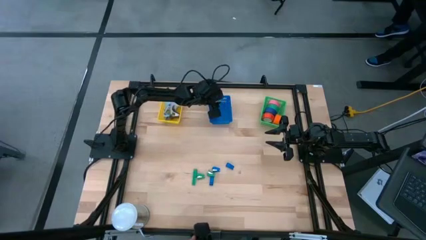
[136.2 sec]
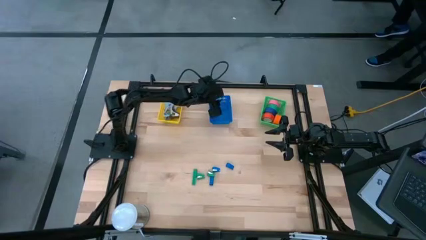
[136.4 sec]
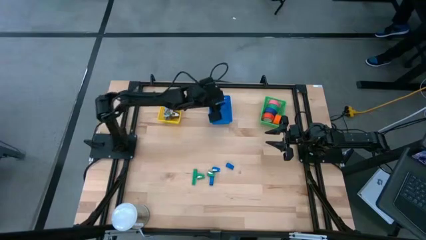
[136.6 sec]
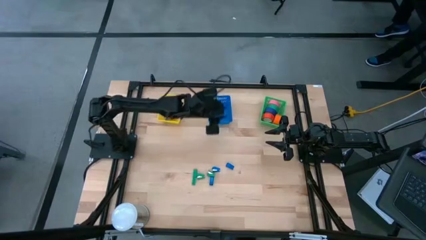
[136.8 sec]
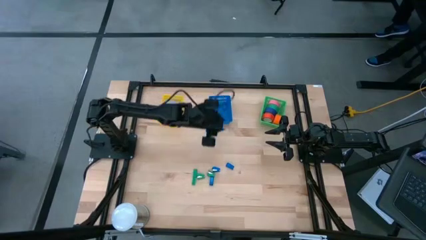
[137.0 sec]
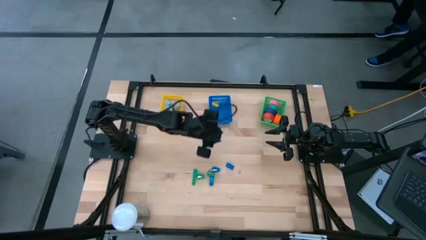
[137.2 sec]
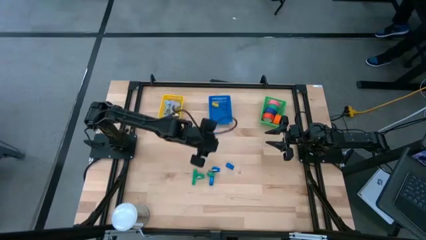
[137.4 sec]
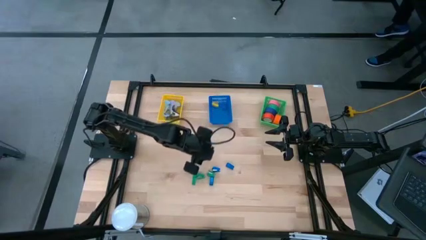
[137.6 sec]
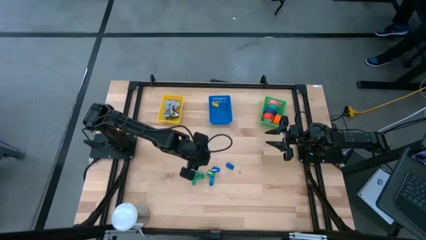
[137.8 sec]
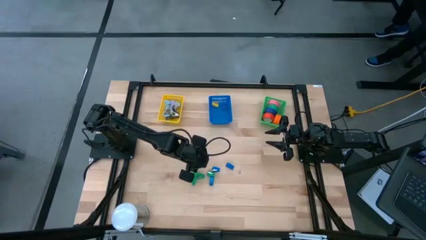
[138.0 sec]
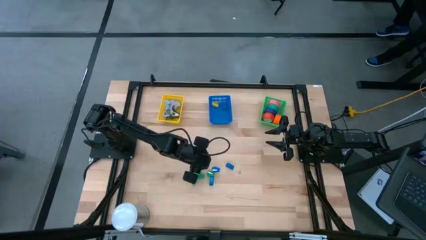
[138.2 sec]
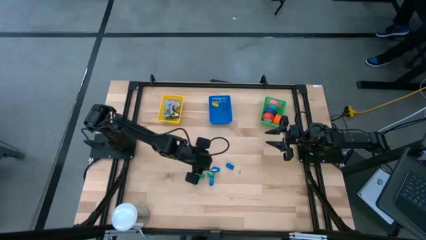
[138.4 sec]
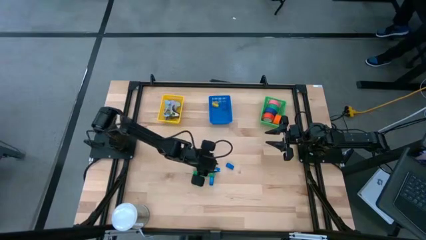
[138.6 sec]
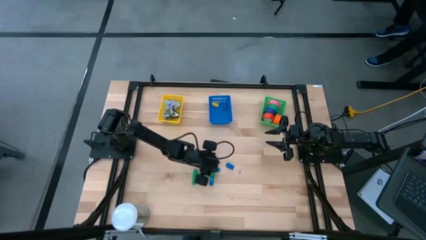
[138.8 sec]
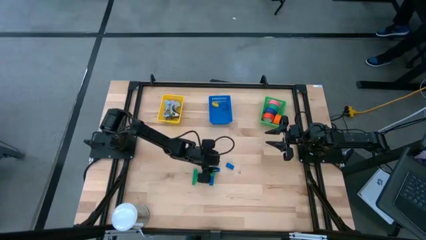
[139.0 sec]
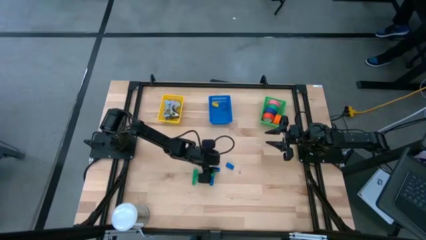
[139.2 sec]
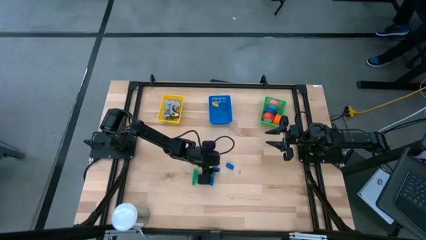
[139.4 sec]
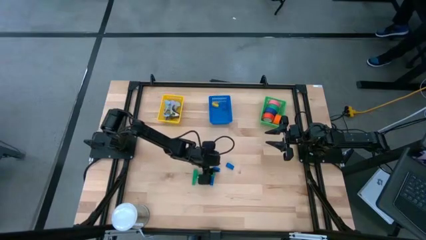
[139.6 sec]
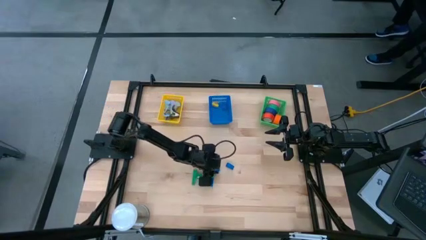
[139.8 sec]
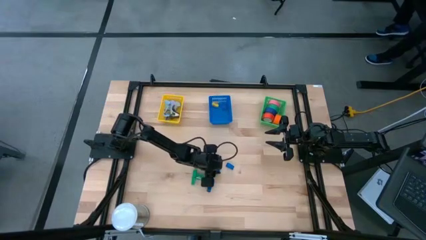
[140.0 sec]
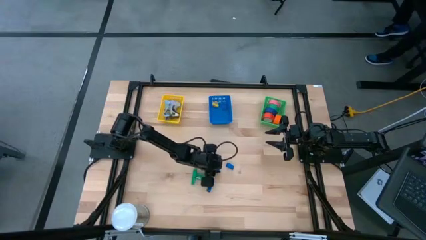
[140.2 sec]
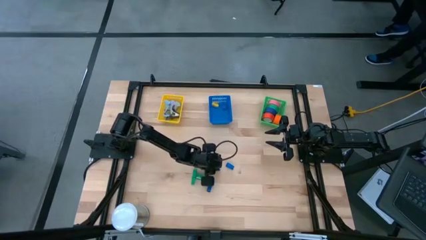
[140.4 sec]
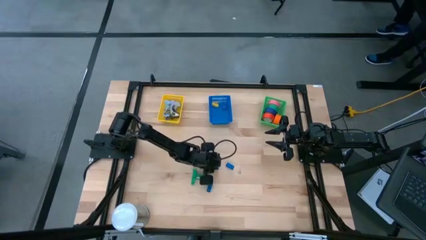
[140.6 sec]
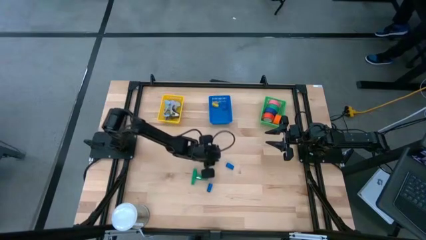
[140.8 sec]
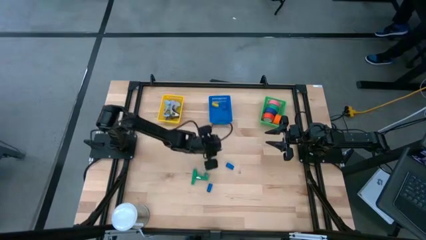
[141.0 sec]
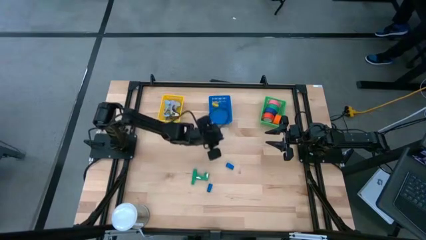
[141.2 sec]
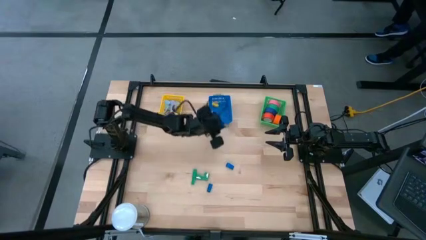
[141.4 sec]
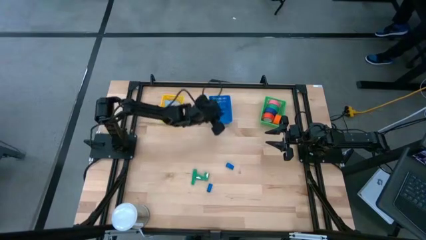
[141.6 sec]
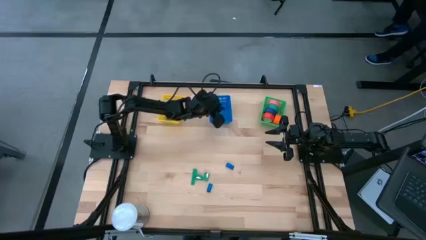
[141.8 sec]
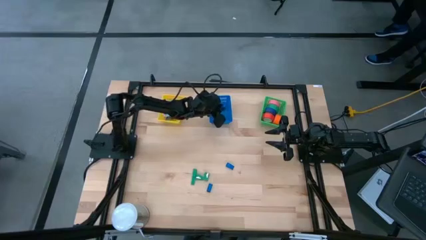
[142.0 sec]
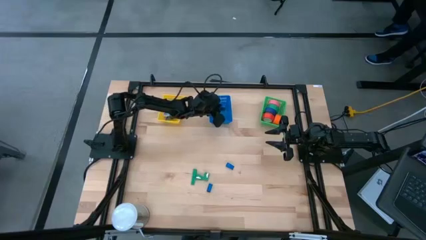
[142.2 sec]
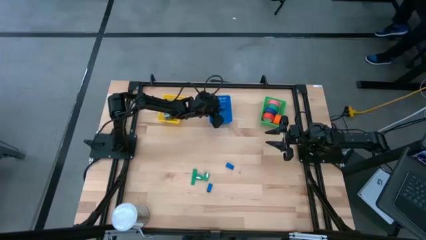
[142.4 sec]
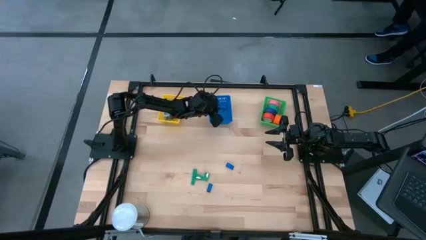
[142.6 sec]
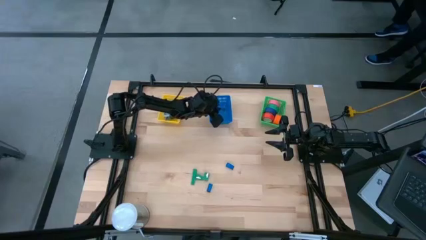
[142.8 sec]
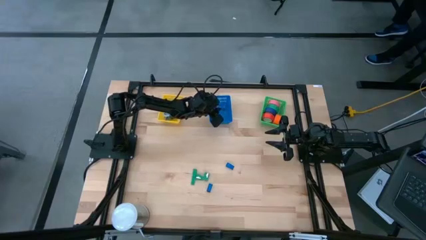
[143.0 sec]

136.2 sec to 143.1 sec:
Task: Pick and place Stapler, Stapler remover, tape
Put the blue stapler into the blue basket

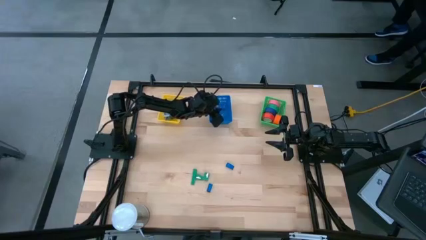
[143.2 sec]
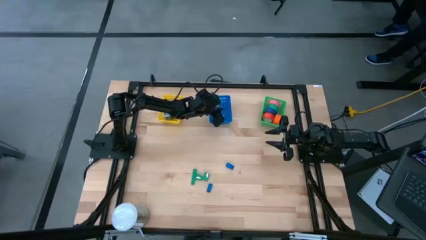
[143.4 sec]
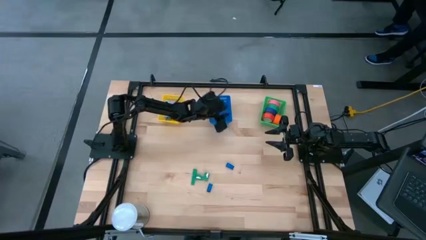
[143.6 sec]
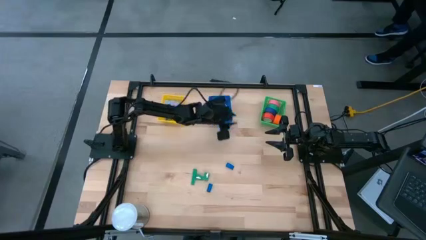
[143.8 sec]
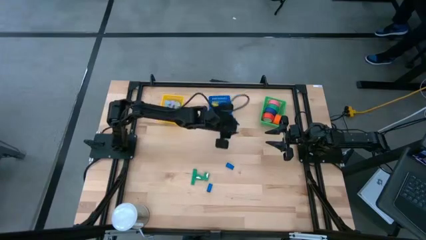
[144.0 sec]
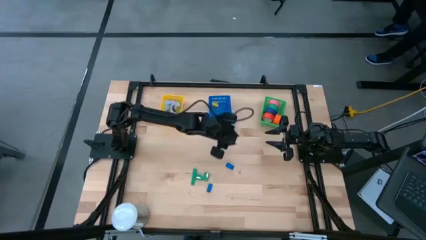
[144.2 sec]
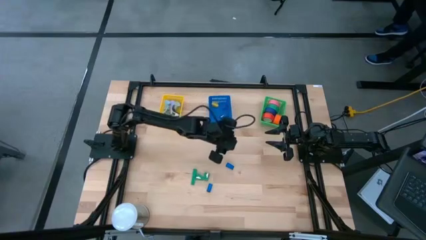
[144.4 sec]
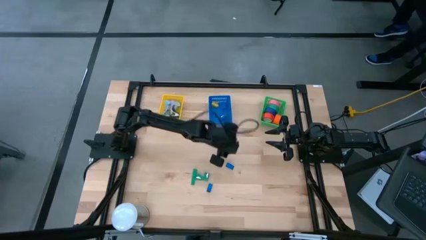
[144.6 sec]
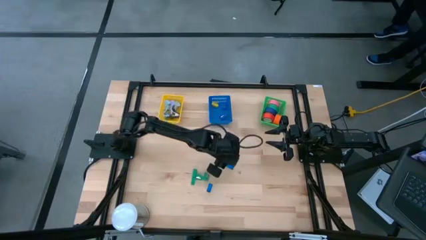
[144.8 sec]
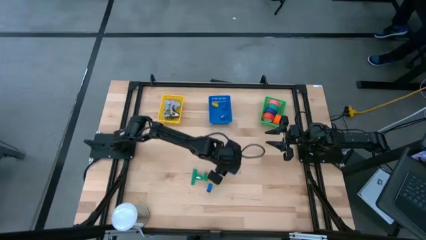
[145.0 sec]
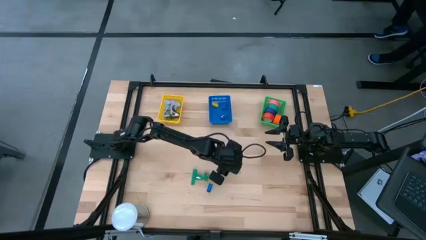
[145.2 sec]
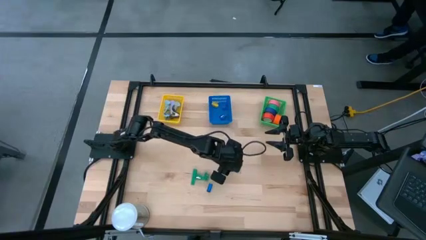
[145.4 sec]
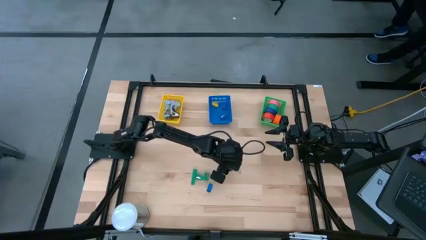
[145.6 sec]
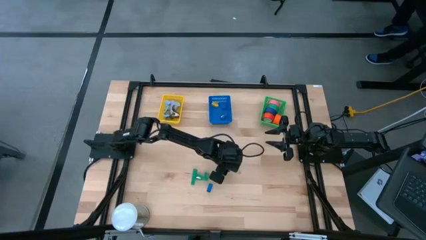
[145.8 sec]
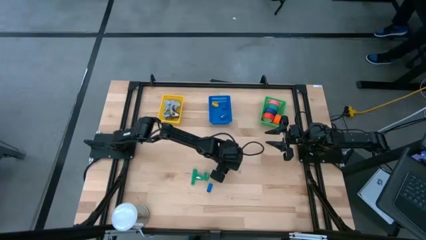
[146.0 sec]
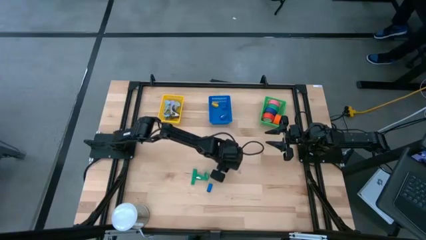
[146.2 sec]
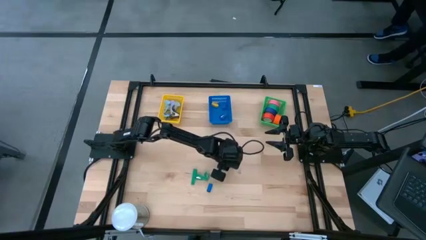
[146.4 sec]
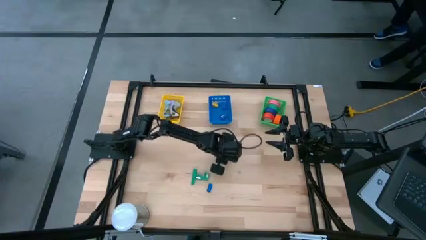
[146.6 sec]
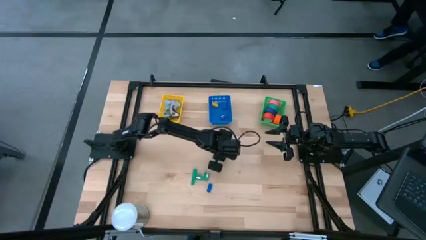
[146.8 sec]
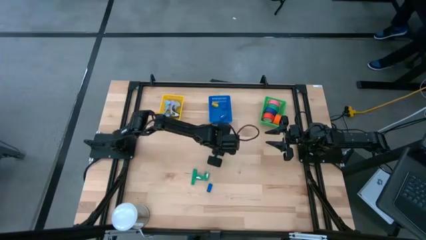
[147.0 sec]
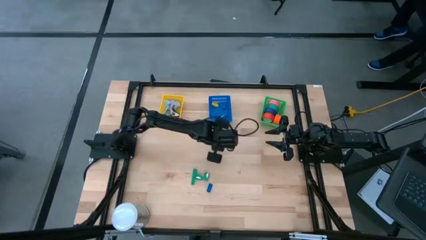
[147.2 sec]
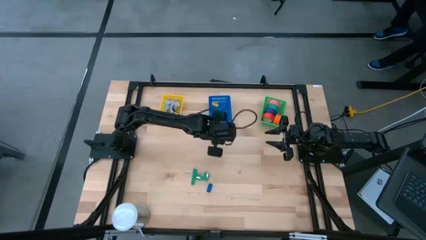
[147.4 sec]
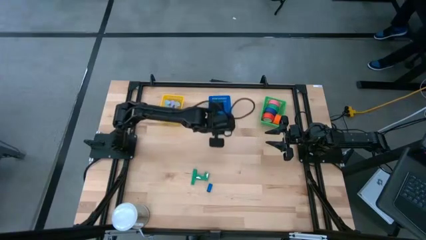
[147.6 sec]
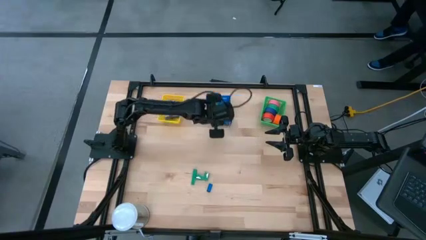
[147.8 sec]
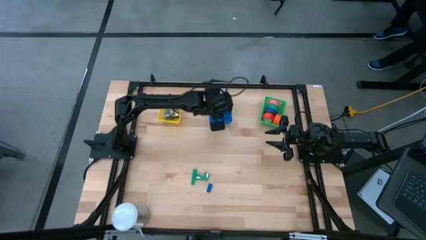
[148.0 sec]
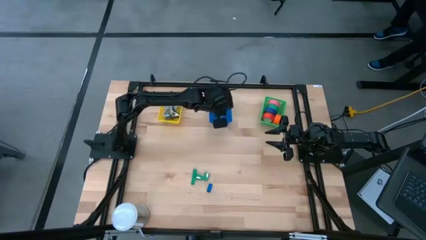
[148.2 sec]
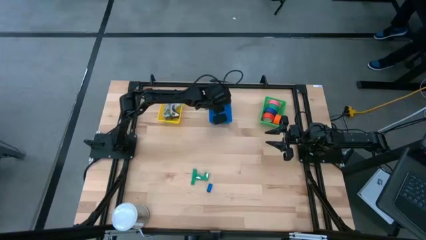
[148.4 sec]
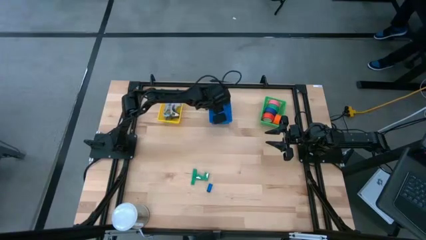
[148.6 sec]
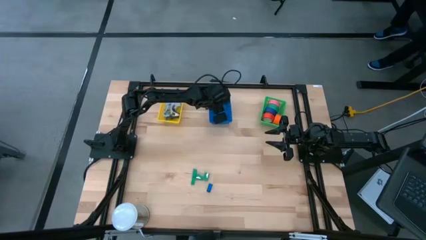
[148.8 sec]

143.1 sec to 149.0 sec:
Put the blue stapler into the blue basket

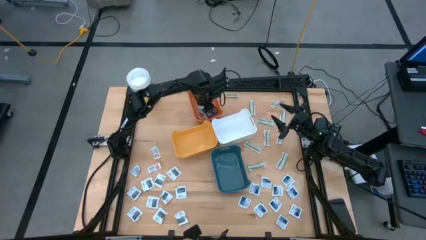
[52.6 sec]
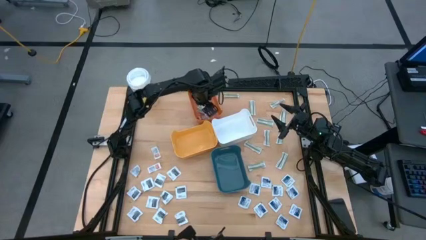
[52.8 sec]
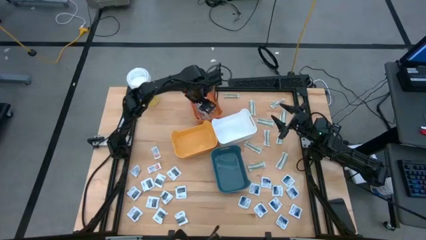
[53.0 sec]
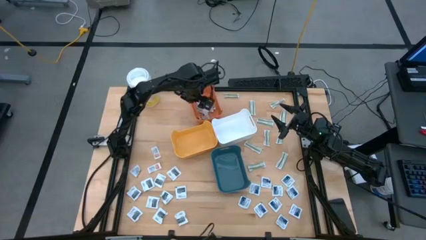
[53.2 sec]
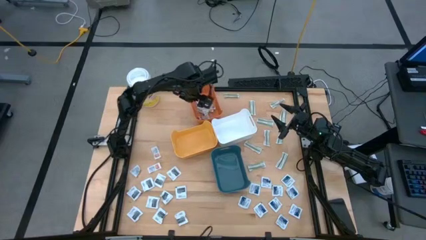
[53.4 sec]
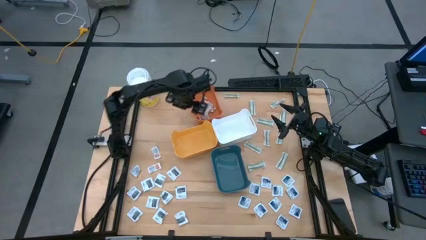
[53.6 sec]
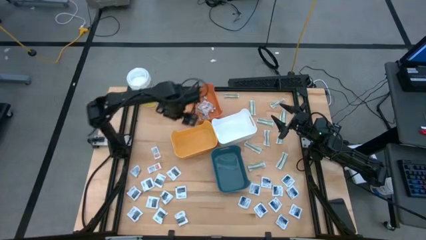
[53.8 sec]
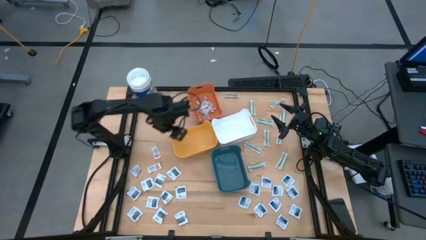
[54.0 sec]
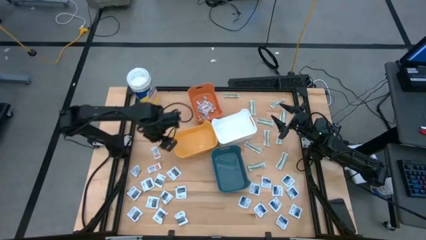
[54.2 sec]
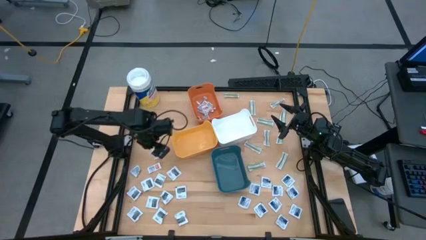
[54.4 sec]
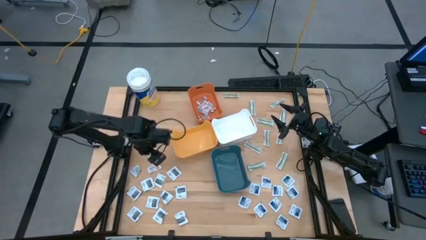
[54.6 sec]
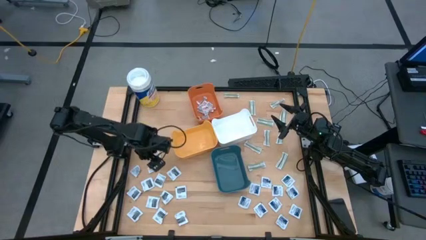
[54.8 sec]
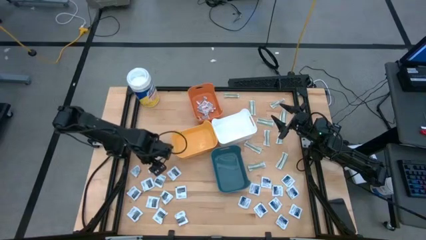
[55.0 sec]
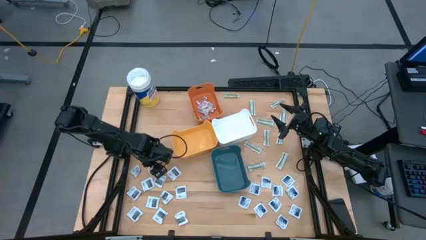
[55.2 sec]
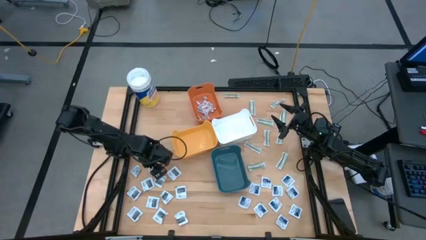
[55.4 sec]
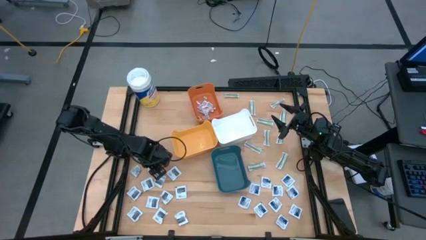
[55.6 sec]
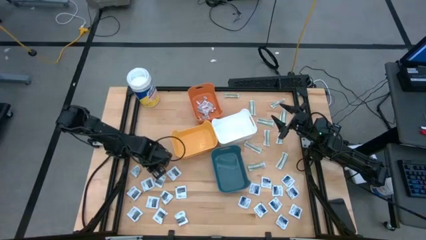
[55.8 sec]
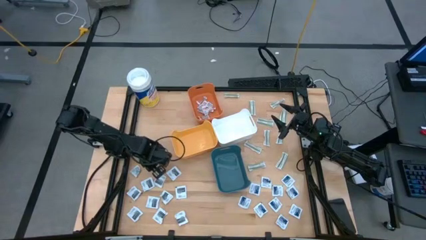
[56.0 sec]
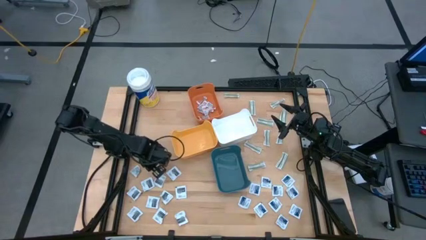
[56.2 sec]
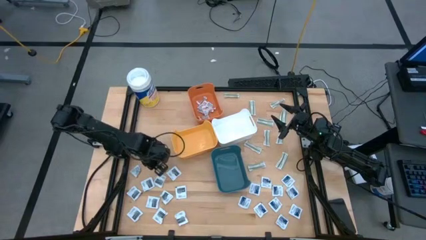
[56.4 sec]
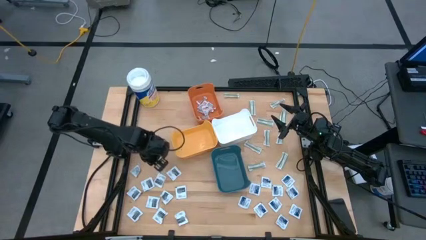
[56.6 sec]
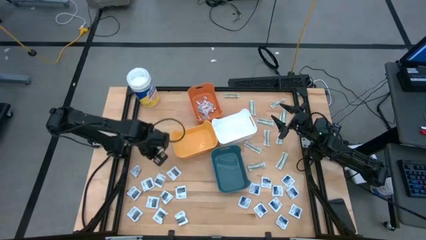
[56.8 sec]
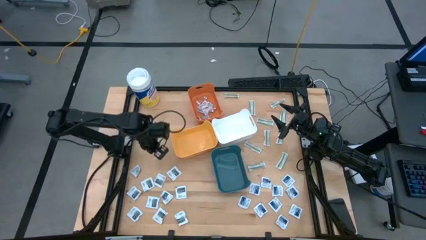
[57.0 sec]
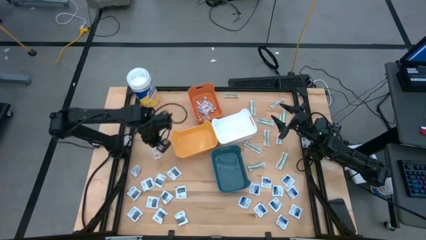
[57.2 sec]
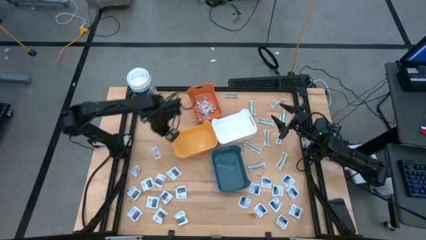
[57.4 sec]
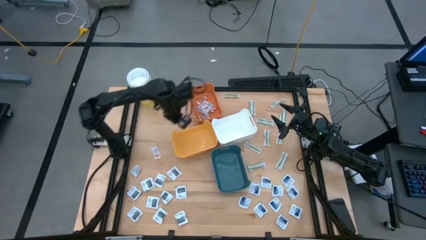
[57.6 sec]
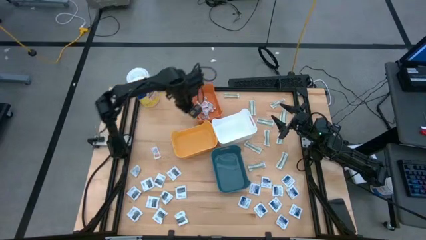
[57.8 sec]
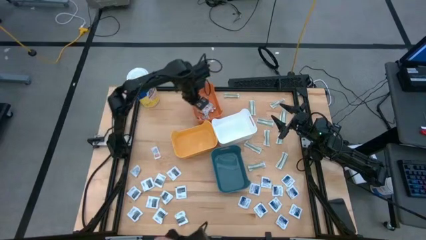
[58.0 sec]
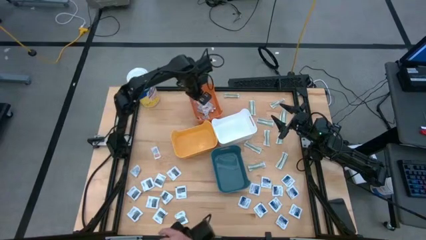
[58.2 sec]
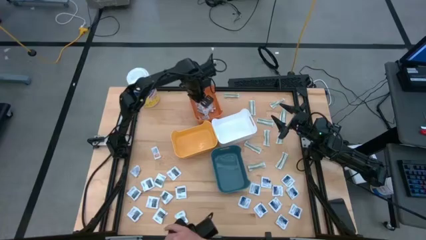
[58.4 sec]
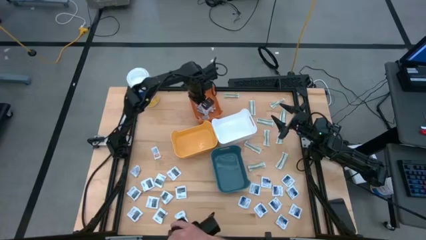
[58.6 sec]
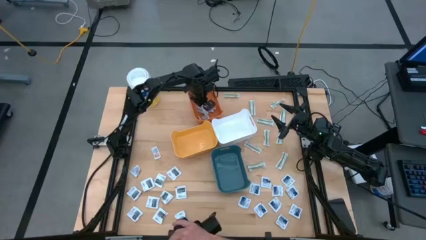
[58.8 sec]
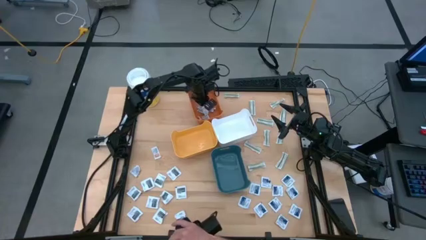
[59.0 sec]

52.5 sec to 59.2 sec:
Task: Pick & Place First Aid Supplies
Put the orange ointment pack into the orange bin
